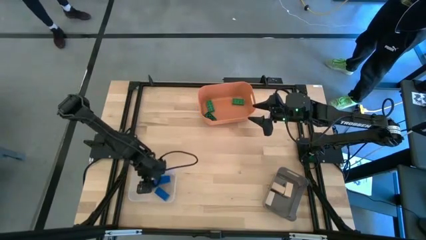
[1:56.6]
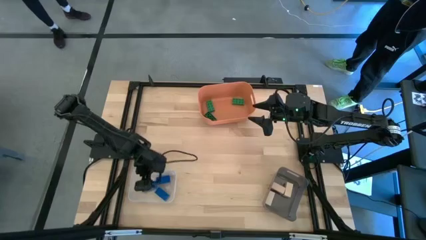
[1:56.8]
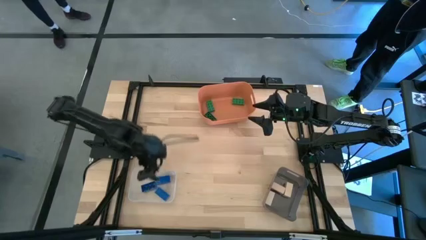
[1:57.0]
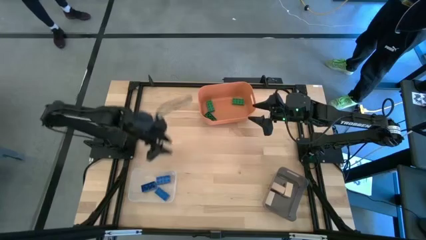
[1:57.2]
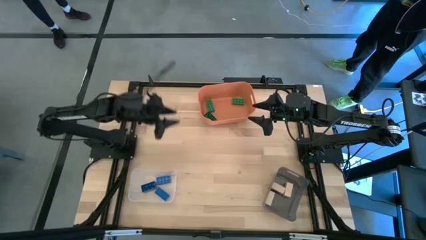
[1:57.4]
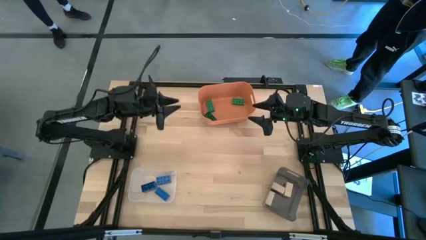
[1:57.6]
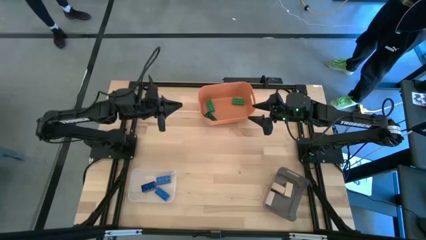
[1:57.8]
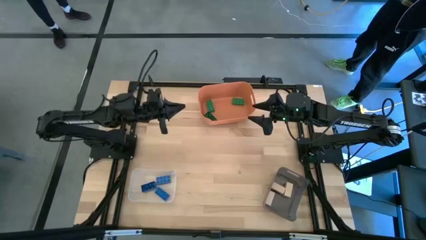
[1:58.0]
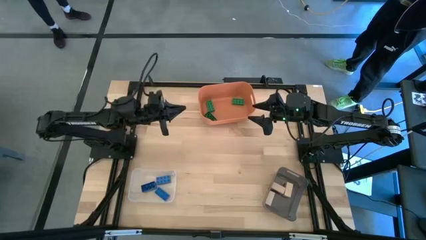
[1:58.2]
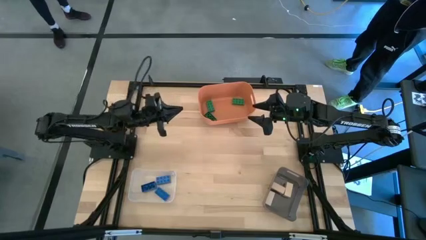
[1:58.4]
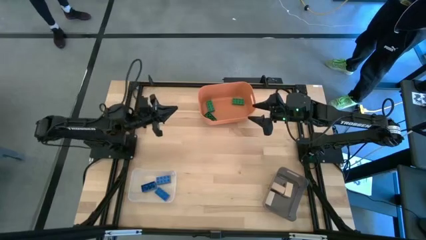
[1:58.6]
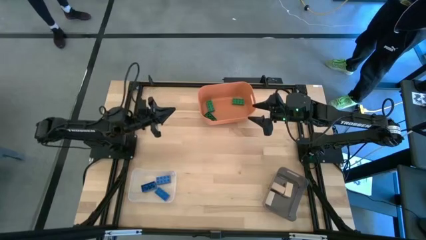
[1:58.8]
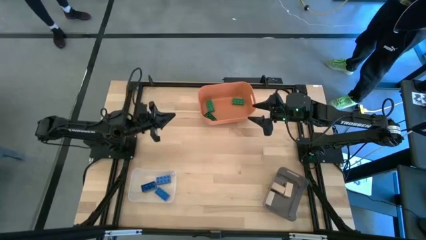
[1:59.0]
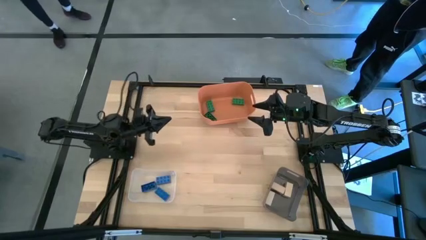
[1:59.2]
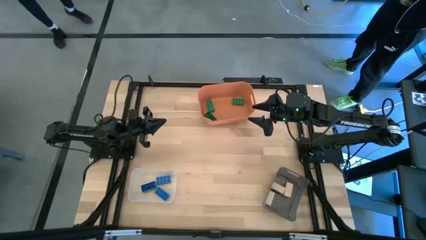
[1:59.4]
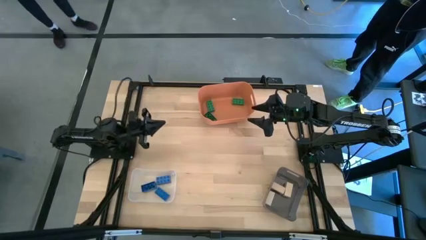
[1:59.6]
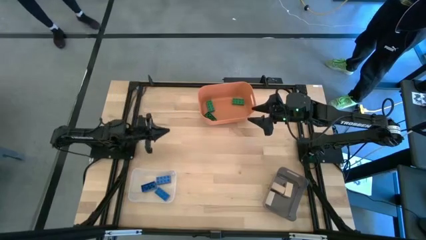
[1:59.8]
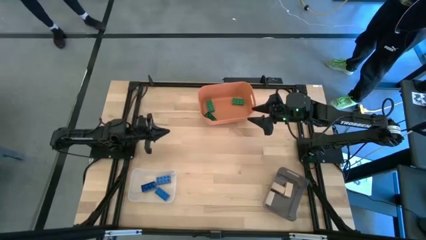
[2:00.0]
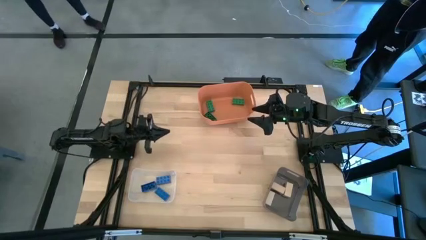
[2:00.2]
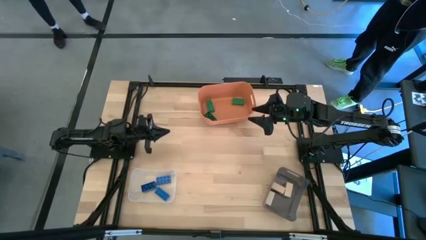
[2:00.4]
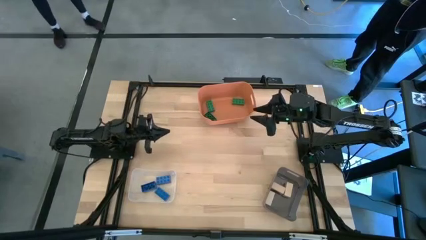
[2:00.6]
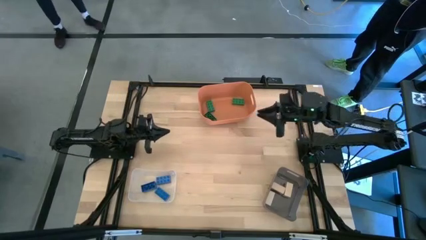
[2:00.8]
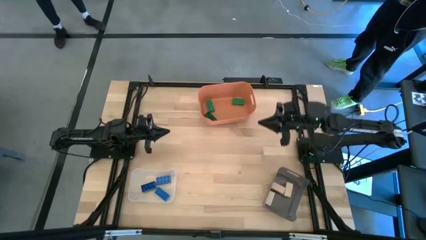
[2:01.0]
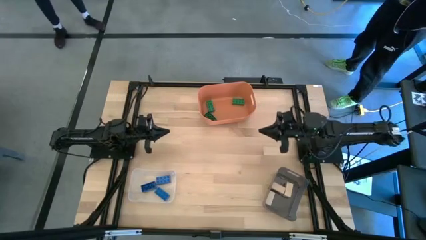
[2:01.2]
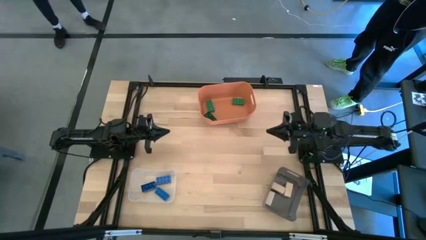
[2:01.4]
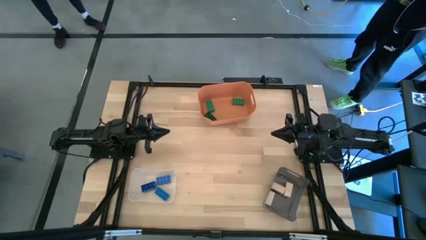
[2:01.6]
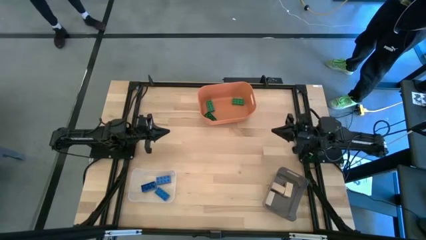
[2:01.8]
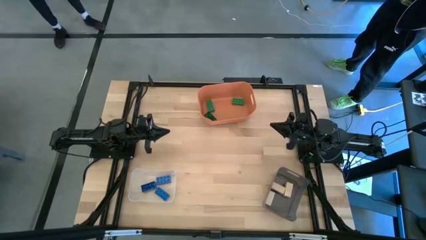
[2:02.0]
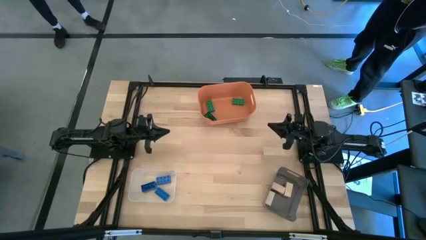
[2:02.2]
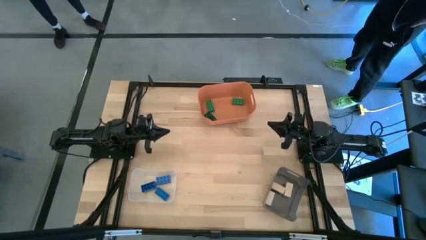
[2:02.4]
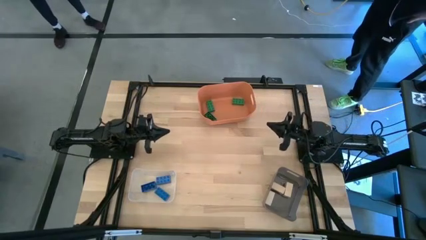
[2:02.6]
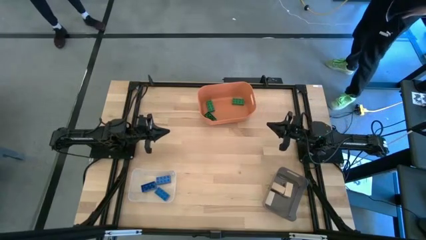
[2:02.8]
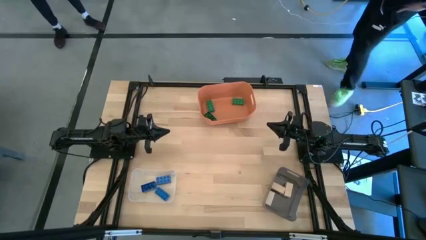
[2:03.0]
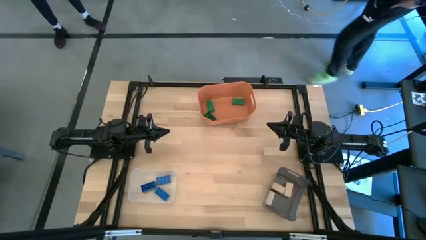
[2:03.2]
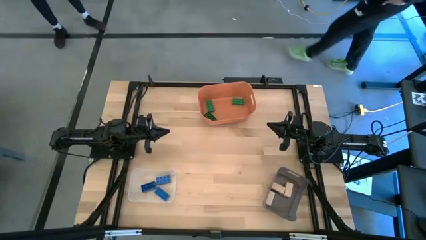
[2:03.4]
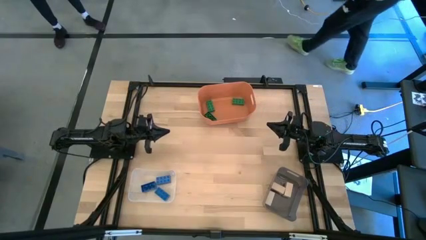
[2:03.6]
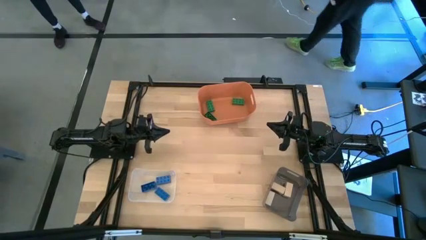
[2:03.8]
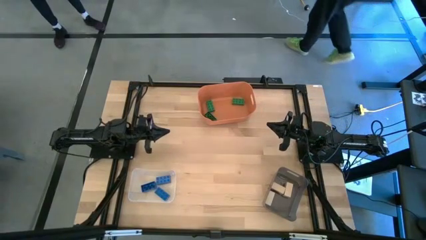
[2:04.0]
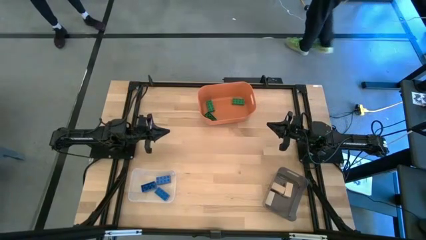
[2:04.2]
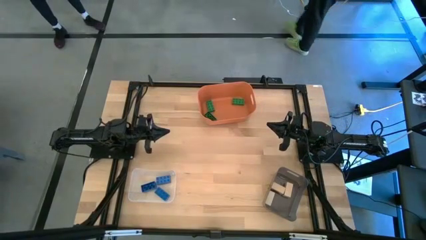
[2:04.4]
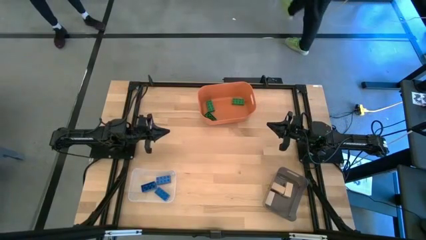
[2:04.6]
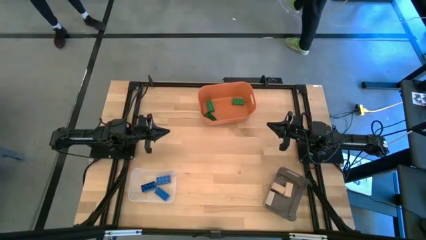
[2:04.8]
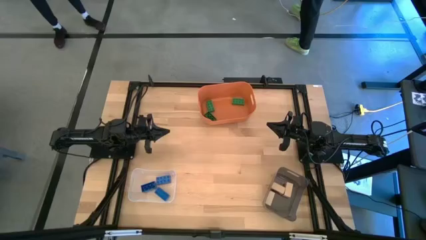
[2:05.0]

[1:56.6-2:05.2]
Task: Sort & place blocks by color
Return to Home Position

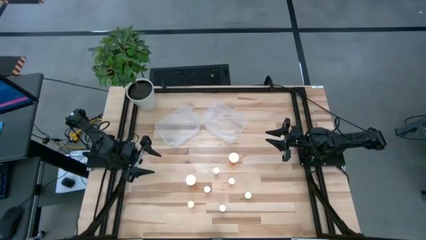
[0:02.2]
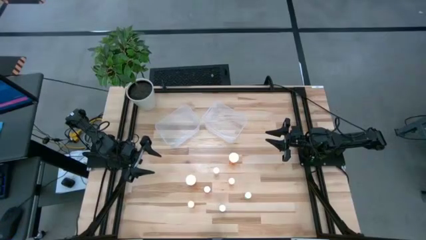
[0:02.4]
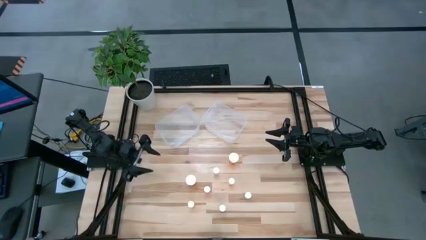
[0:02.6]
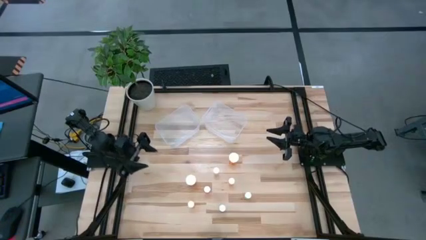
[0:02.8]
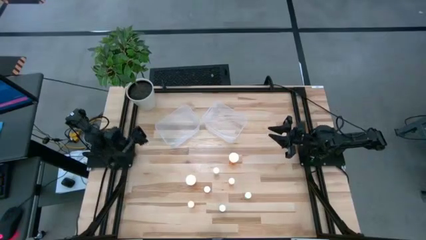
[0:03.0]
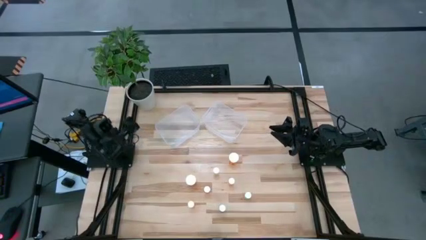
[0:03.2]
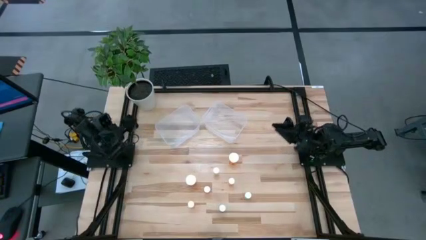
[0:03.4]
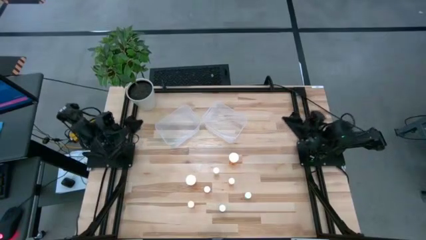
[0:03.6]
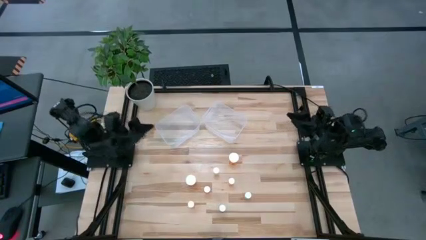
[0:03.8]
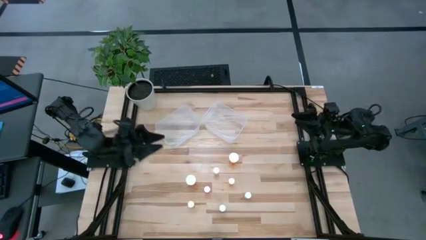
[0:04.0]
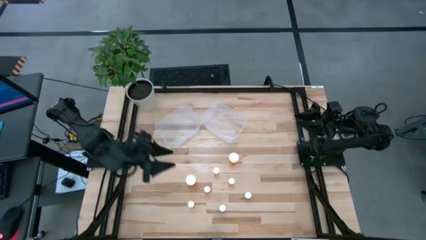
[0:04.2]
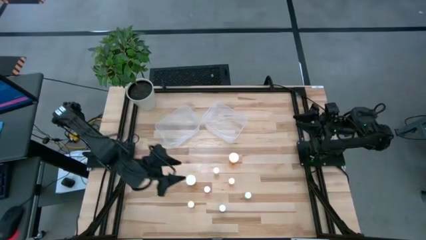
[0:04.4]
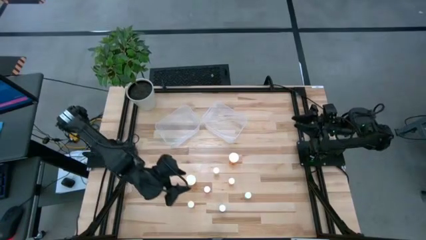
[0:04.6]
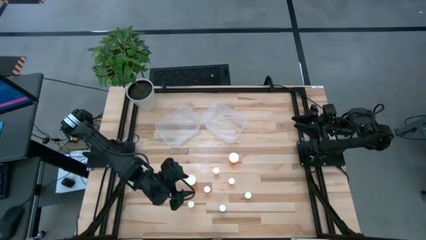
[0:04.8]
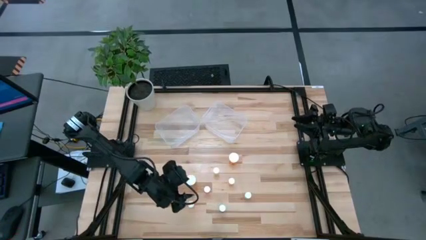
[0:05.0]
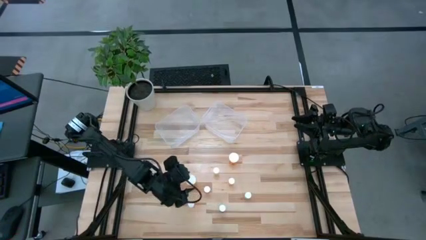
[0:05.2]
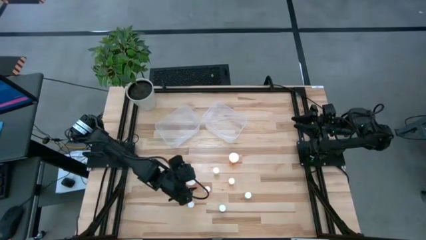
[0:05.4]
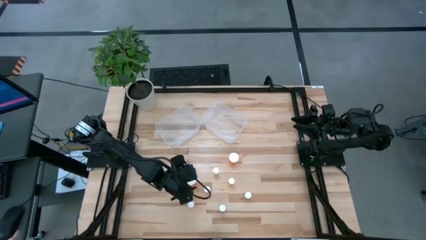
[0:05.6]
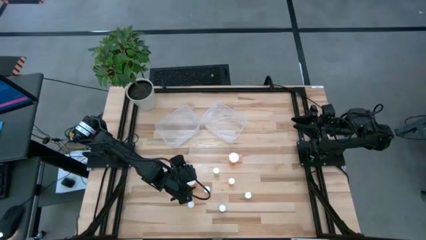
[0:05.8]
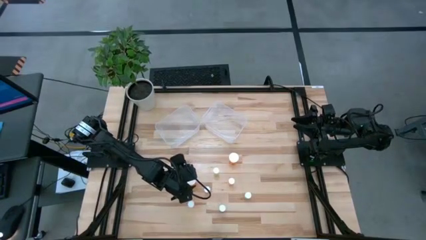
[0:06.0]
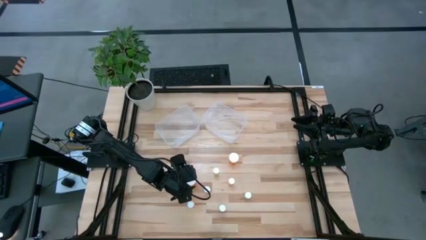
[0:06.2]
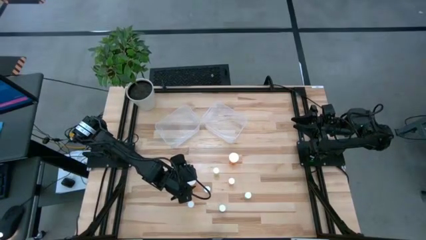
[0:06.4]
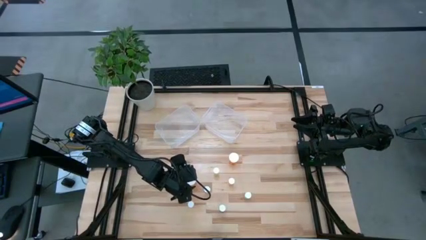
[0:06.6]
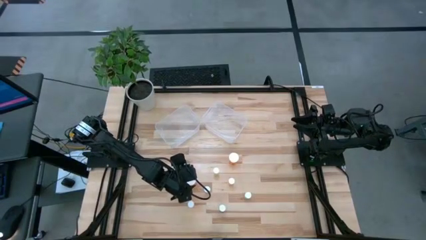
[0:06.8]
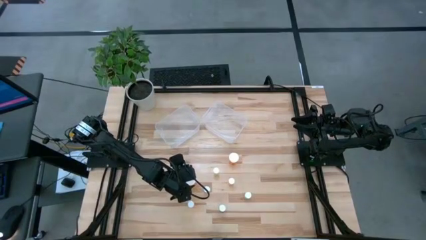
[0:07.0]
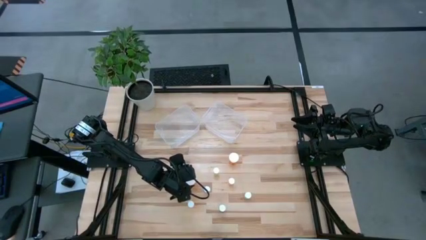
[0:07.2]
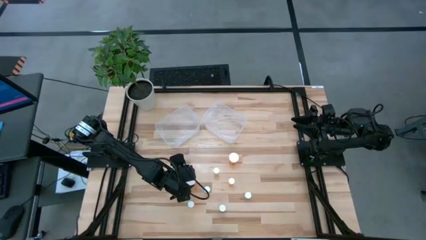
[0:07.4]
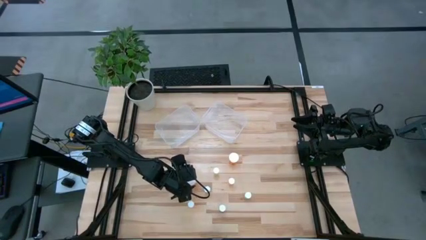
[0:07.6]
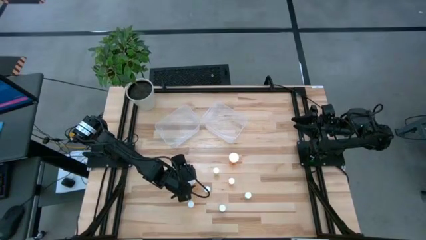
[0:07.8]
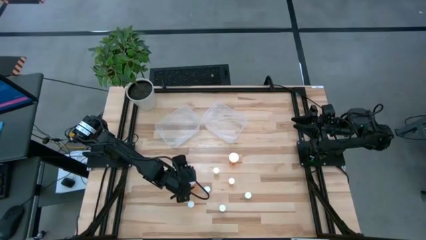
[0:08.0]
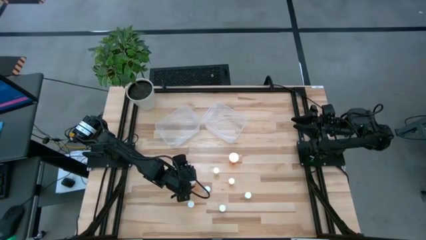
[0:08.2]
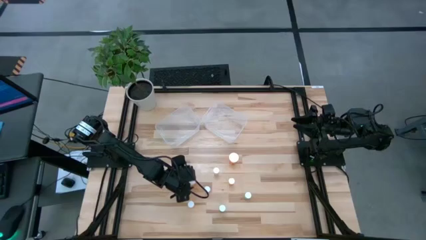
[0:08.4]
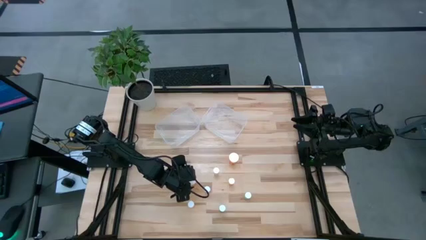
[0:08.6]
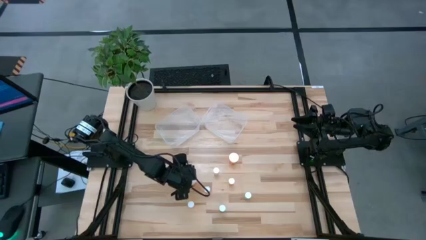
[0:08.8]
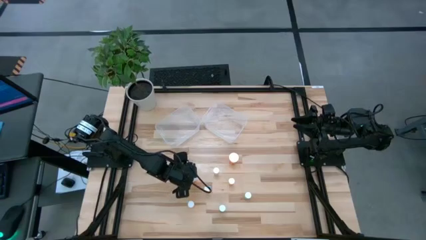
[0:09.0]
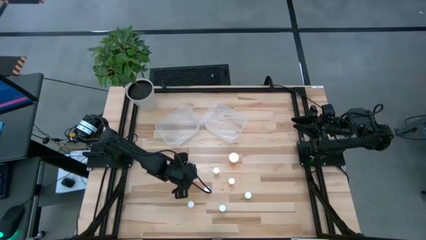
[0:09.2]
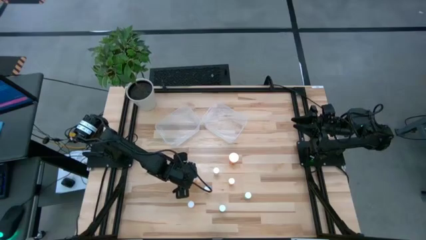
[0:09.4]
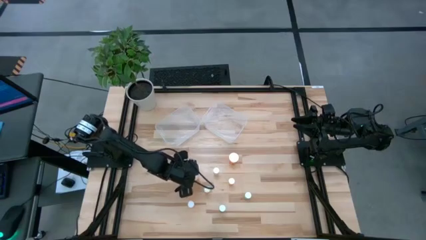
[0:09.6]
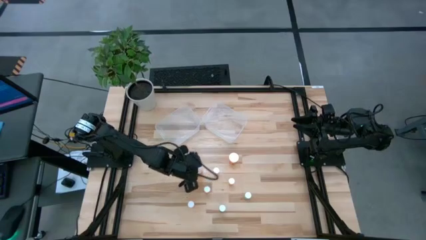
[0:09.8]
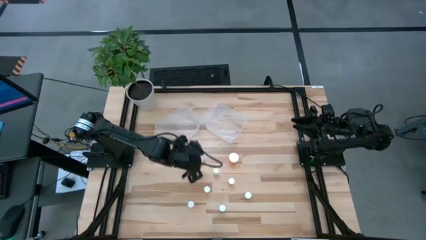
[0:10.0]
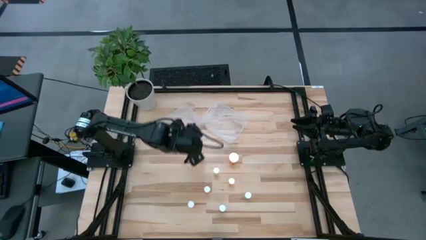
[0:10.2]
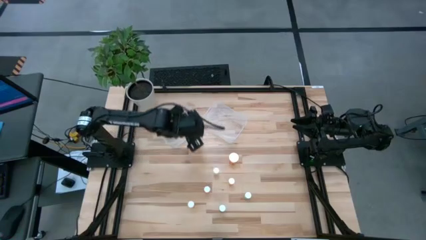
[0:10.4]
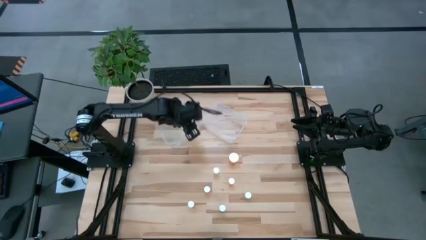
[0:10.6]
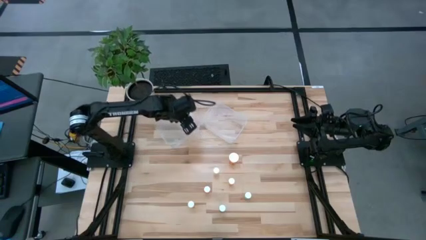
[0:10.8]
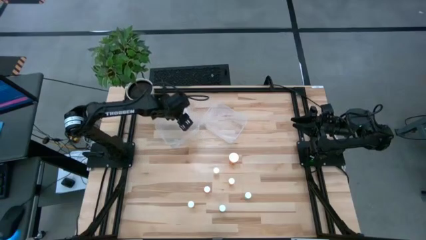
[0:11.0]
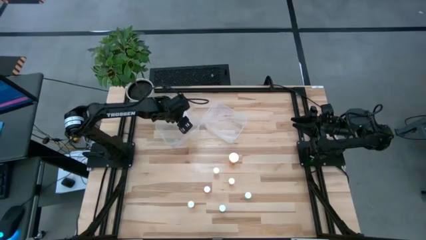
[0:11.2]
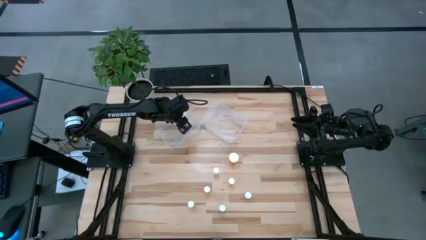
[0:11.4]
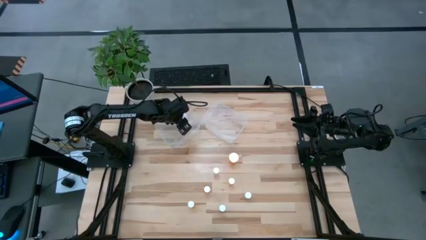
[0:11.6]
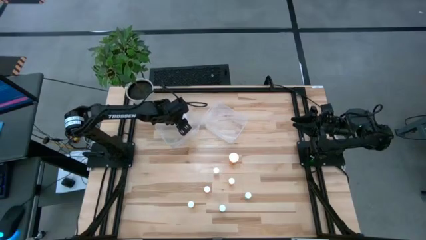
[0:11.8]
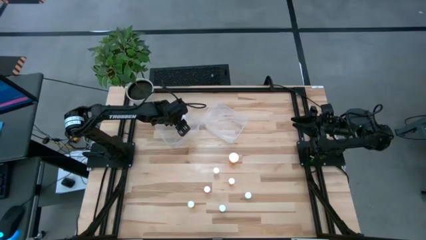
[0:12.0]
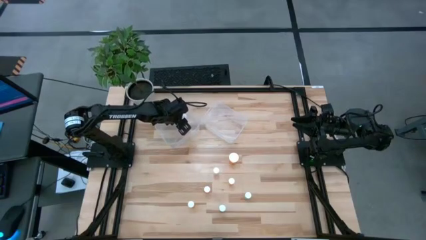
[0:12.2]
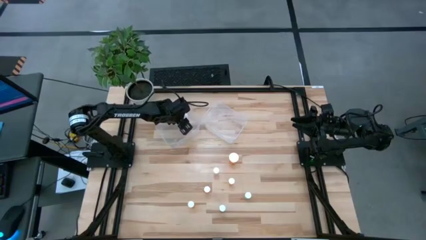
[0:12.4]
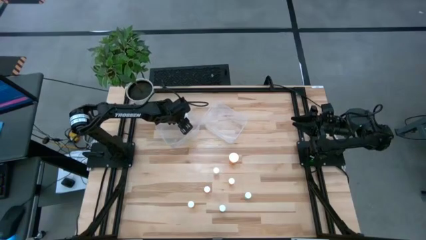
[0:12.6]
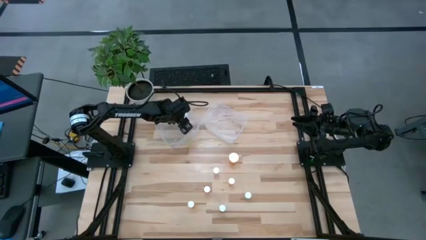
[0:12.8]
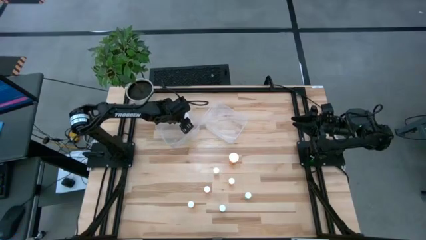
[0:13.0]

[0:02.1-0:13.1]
Task: Pick and place medicine bottles into bin by pill shape (circle, oval)
Put the big orange capsule bottle into the left transparent bin
